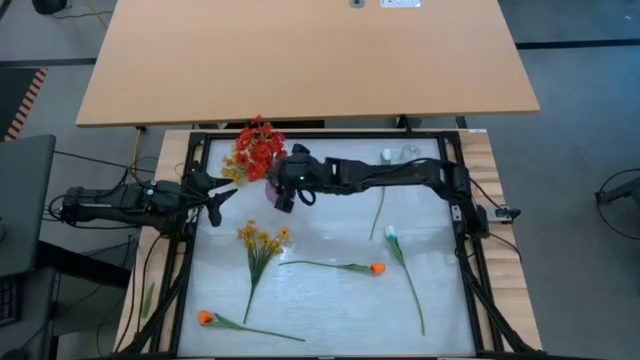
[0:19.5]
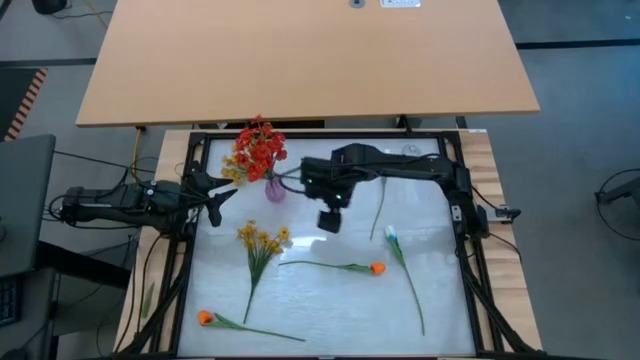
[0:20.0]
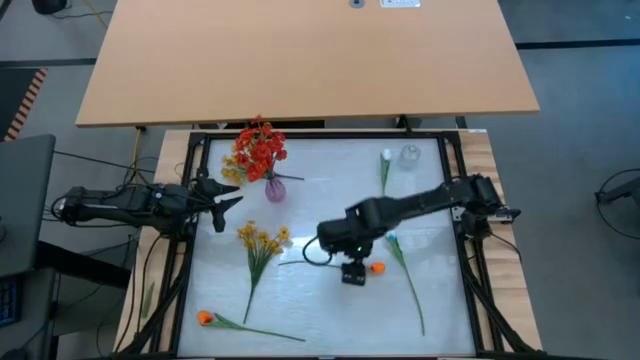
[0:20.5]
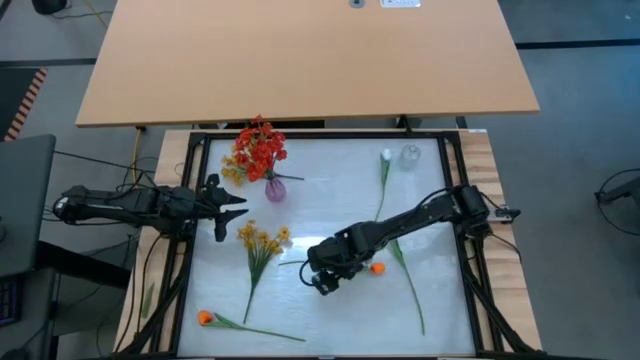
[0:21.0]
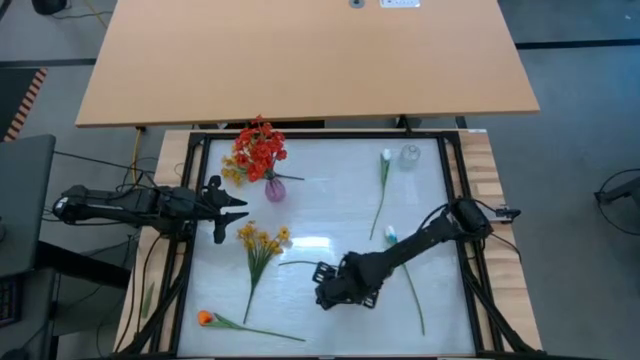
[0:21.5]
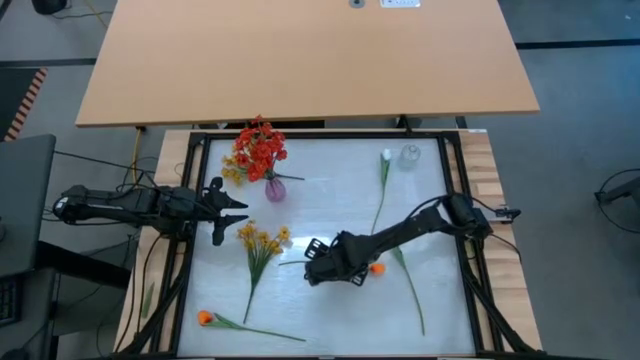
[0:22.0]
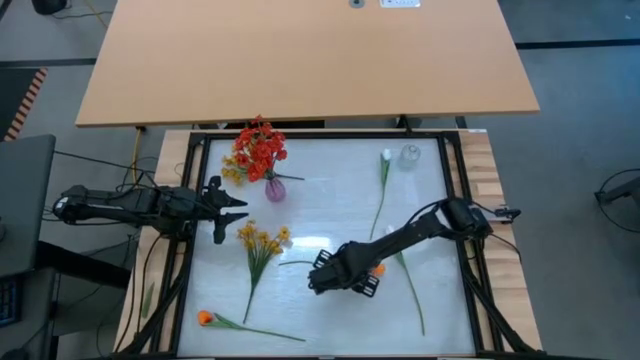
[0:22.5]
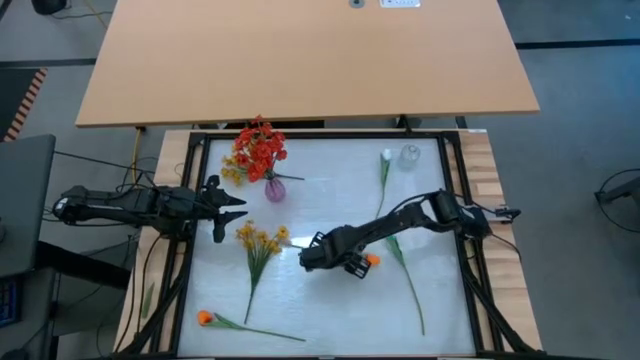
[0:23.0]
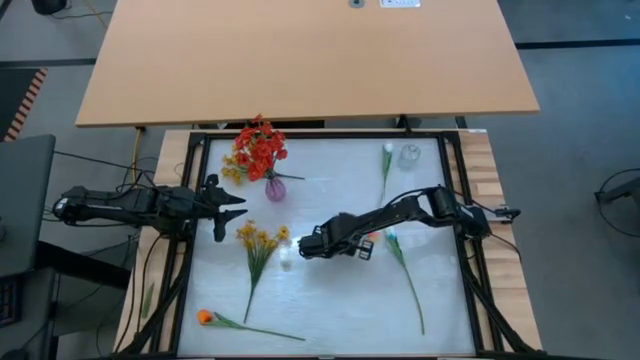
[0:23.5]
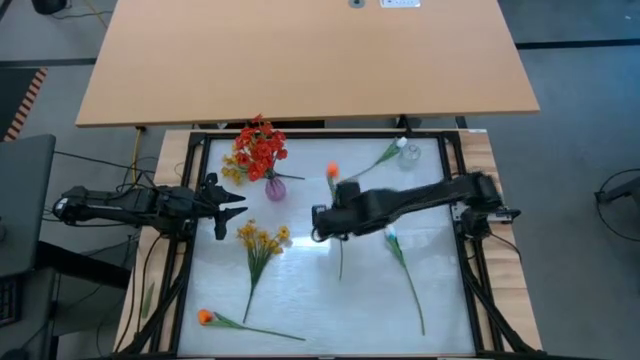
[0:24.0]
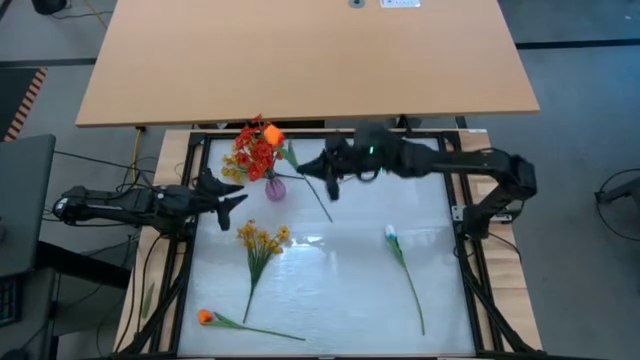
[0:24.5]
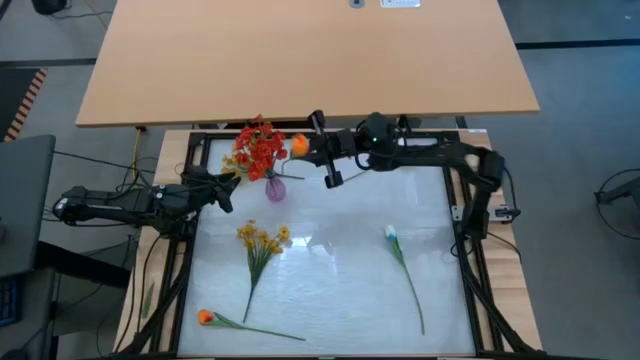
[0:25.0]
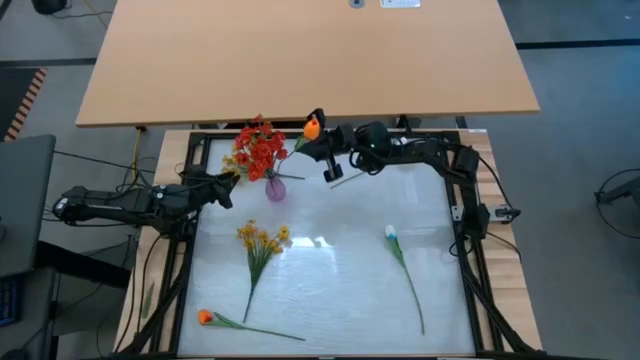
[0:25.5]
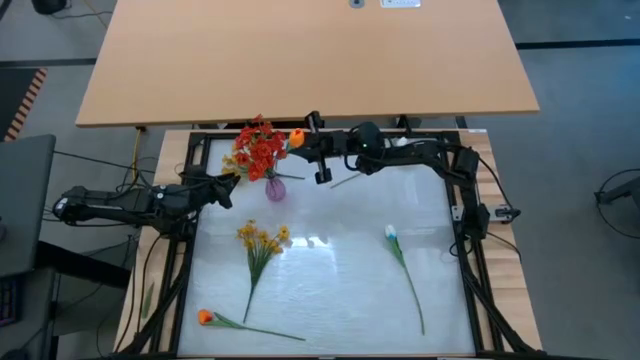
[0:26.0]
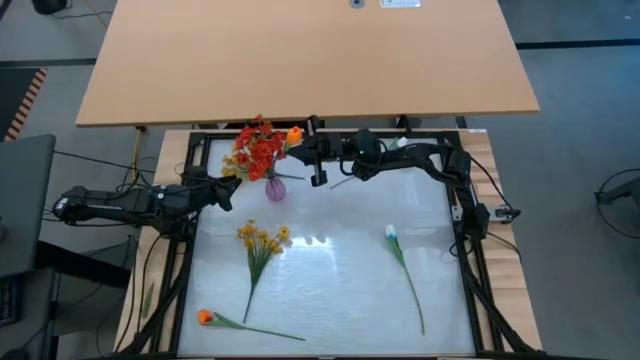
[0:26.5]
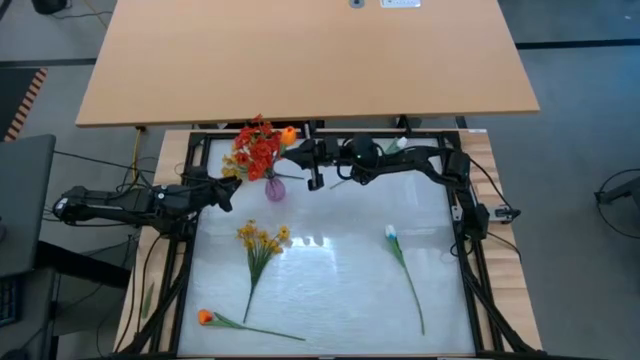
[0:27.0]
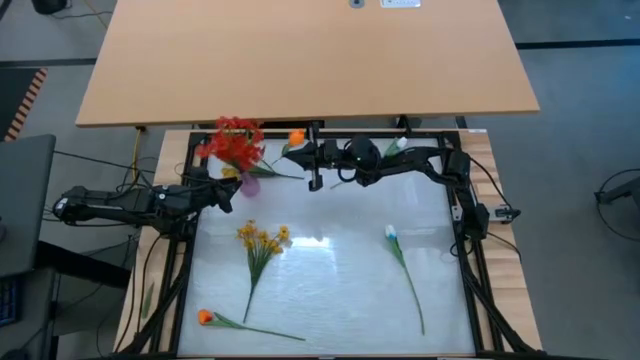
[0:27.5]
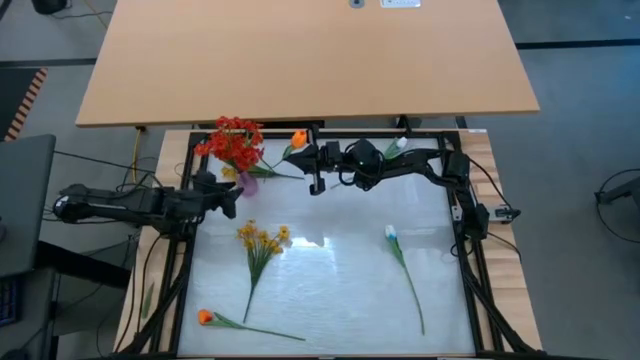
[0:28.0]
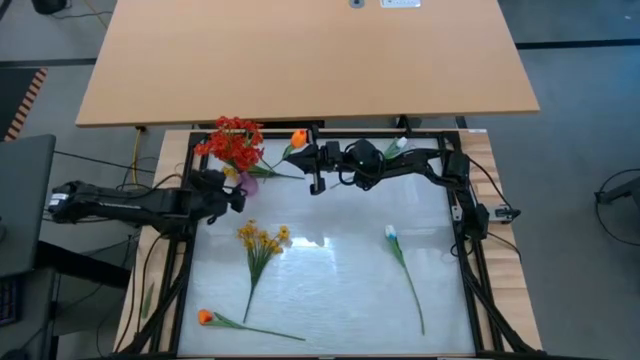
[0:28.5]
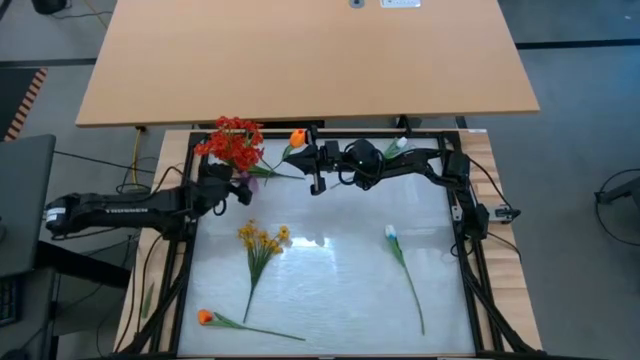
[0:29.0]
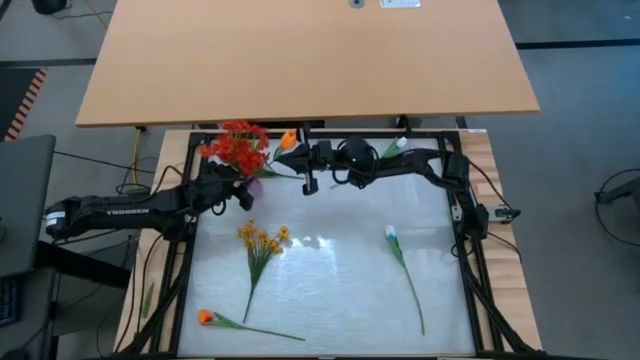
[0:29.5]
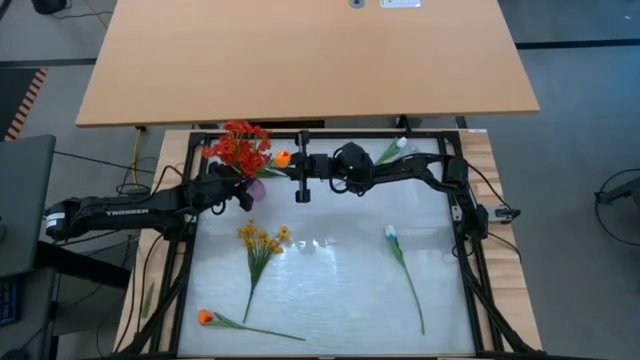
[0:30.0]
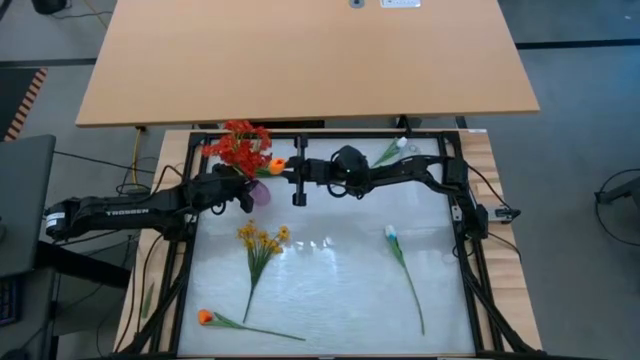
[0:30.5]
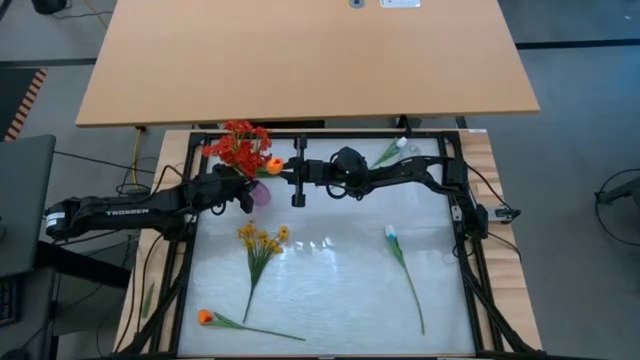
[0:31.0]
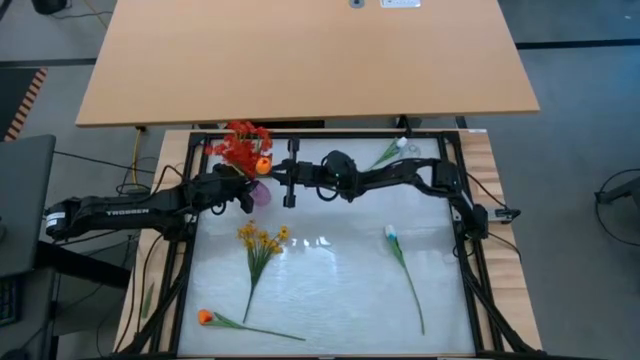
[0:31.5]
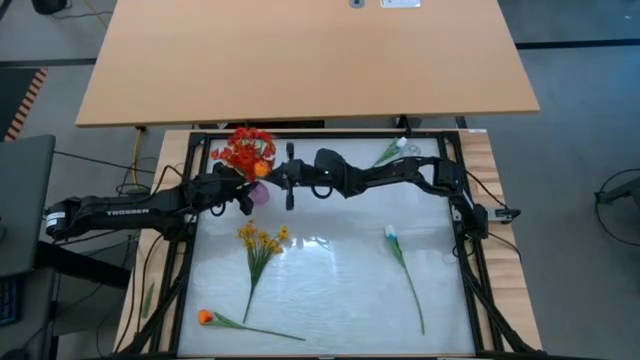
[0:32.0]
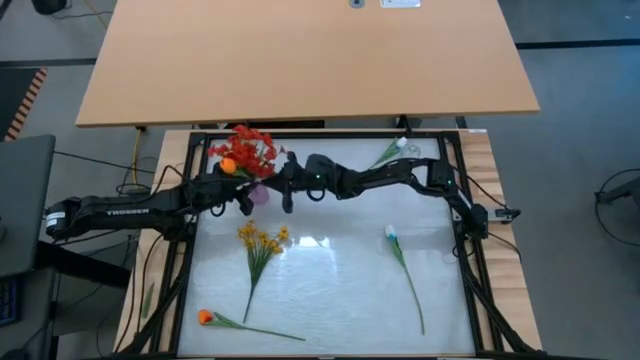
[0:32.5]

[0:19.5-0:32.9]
Task: Sort flowers into vase by color
Put the top orange tulip into the purple vase

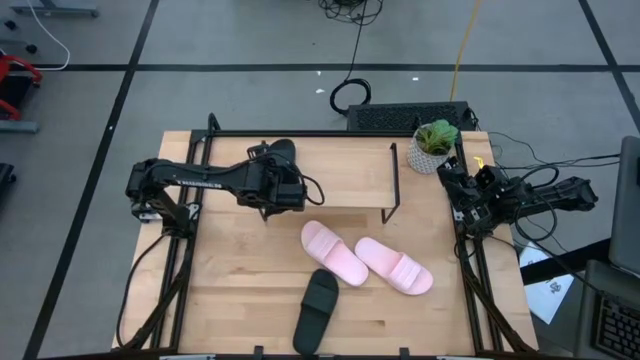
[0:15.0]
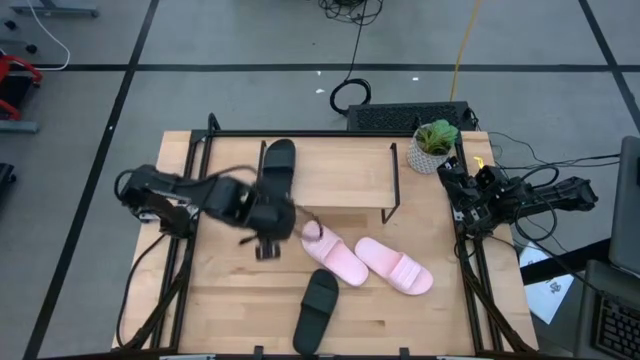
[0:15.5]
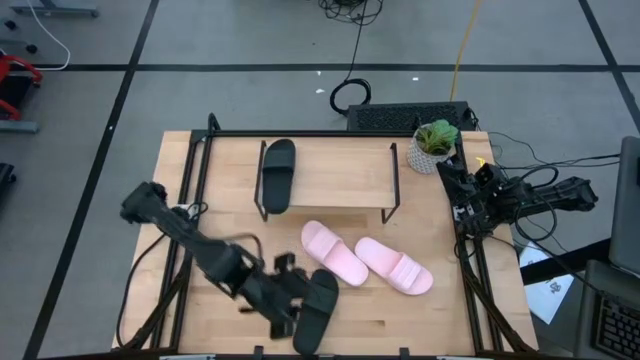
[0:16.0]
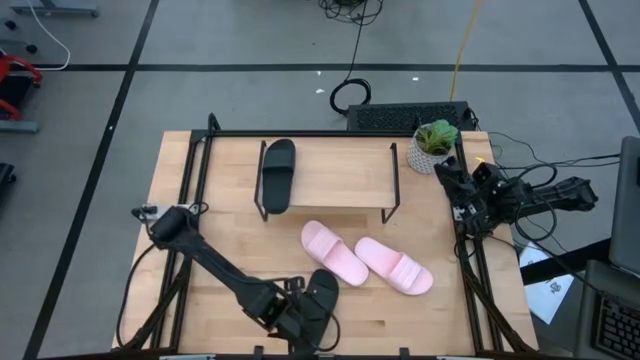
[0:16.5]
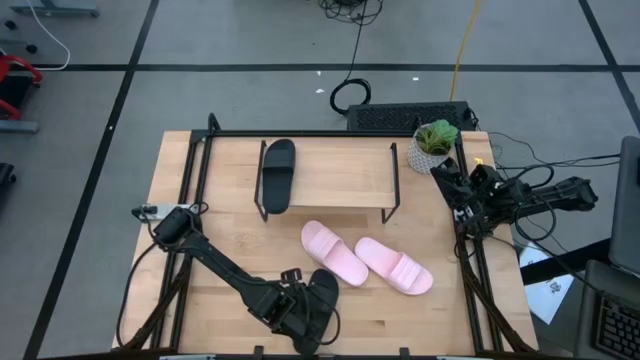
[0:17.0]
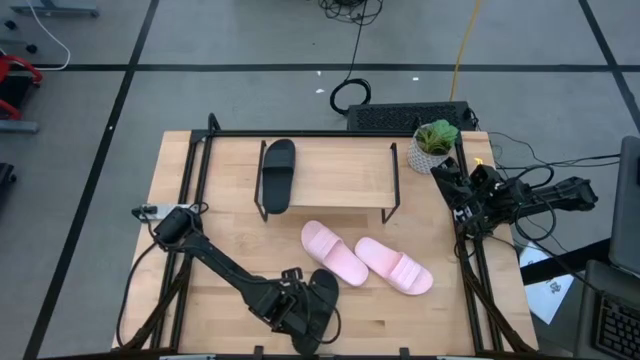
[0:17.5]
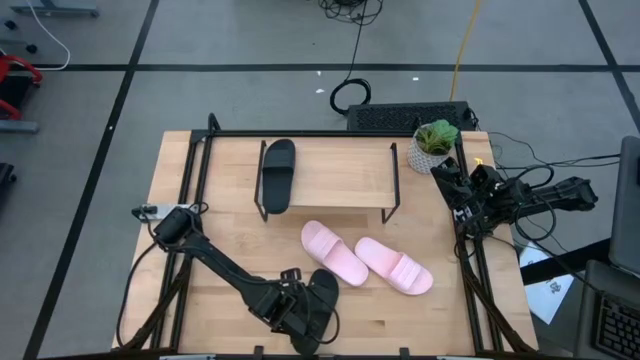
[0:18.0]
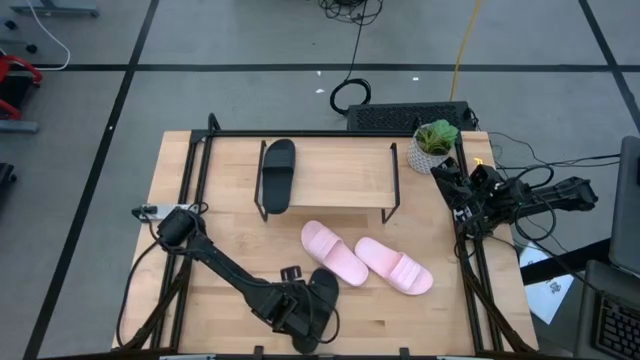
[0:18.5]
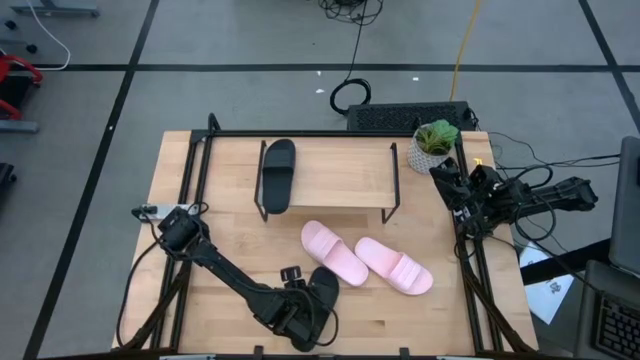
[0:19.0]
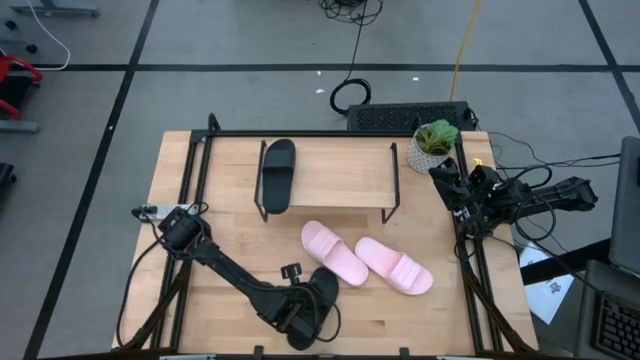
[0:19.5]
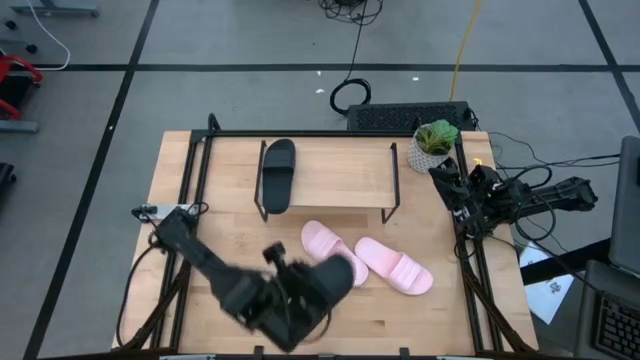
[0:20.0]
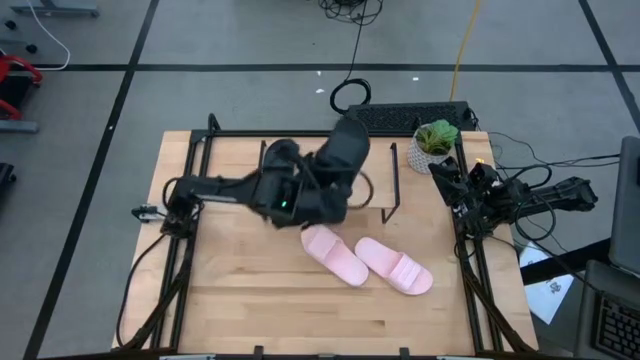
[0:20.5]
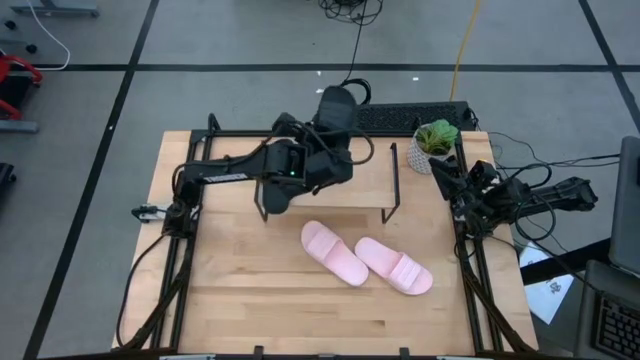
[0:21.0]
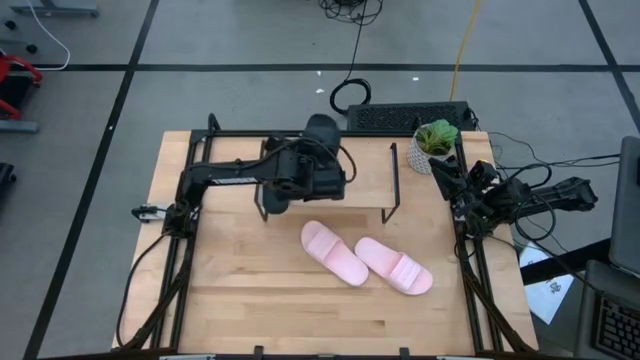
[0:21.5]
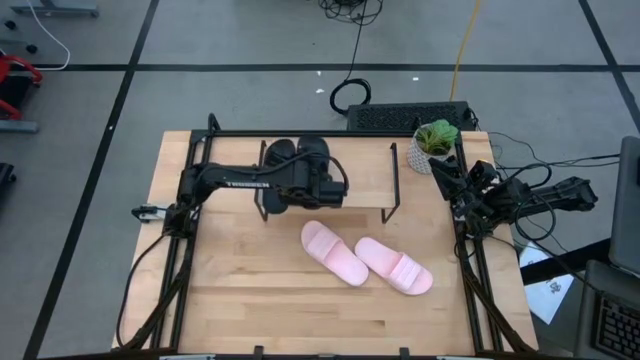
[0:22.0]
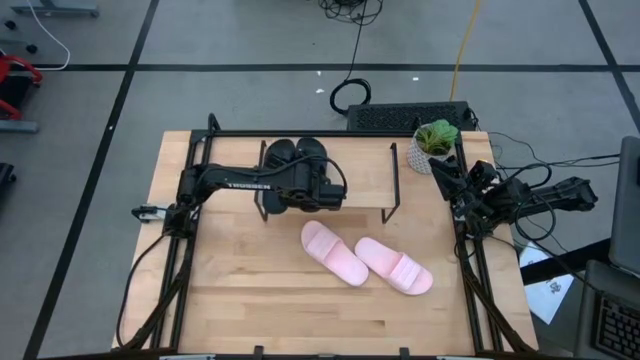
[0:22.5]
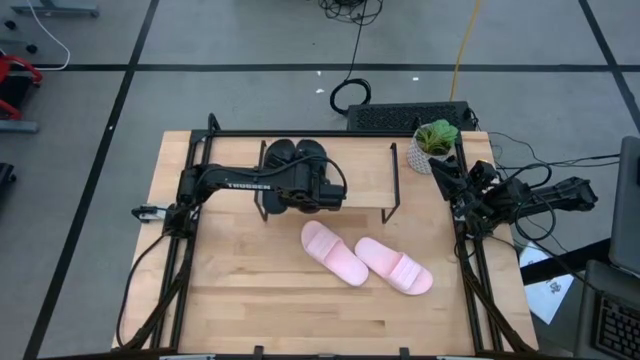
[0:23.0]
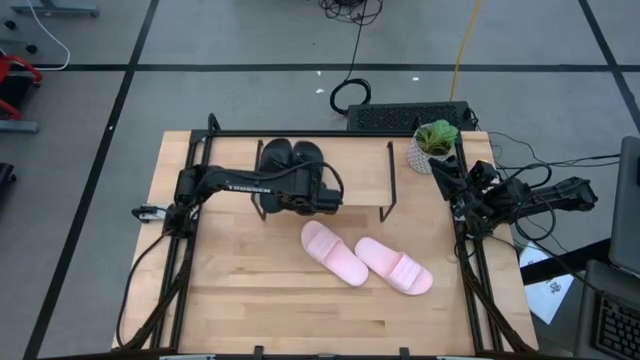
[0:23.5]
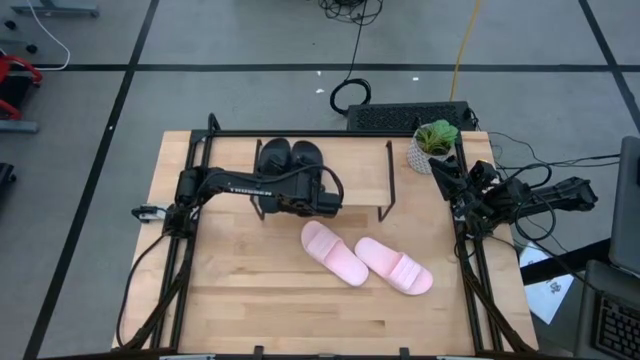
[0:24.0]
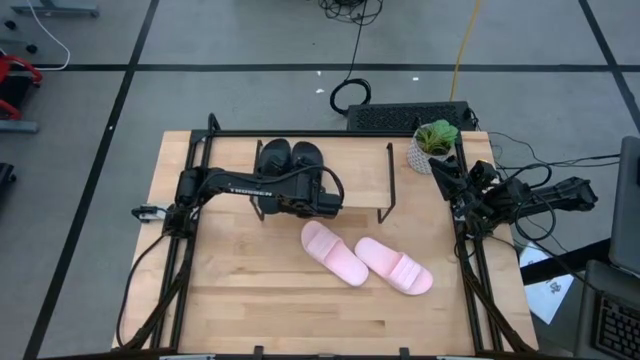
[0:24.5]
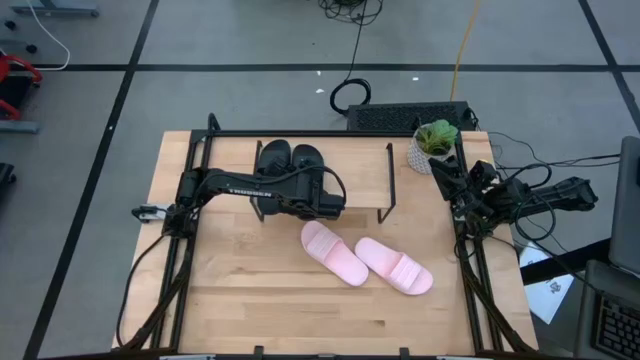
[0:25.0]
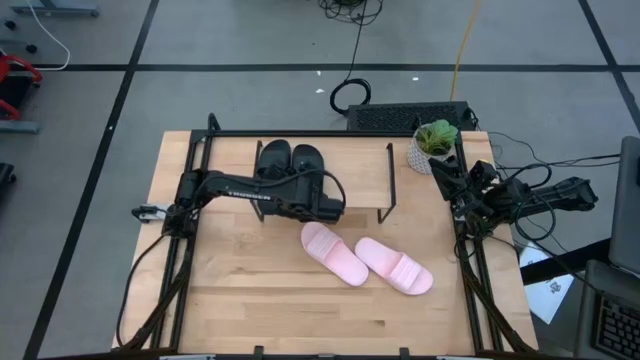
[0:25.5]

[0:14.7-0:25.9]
Task: Pick and place slides into the shelf
Put the black slipper onto the shelf
